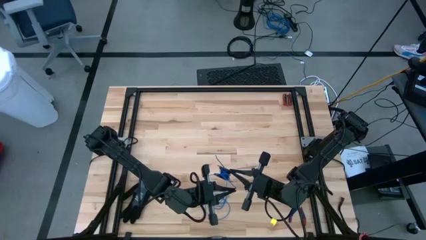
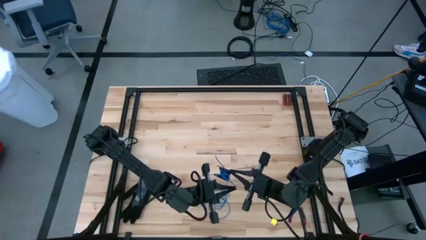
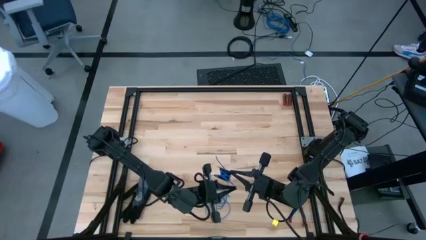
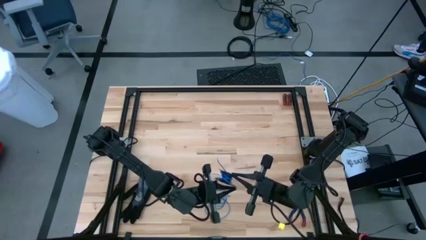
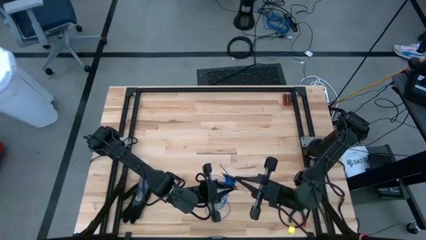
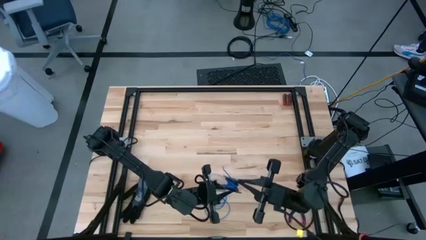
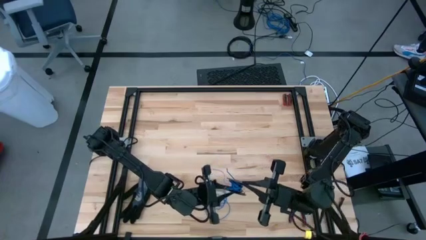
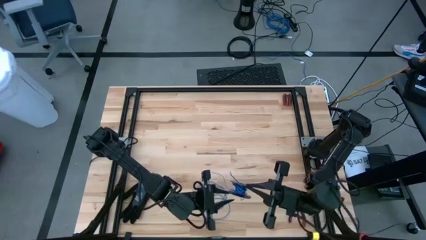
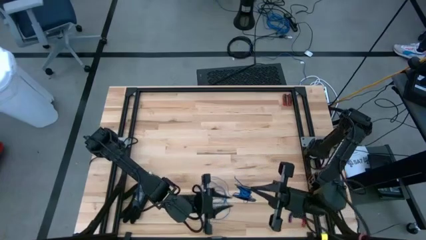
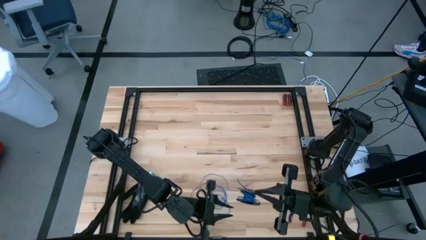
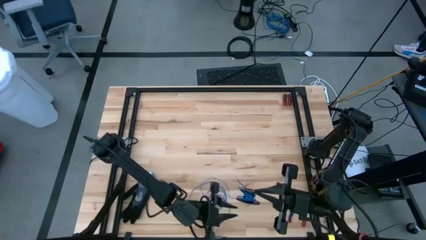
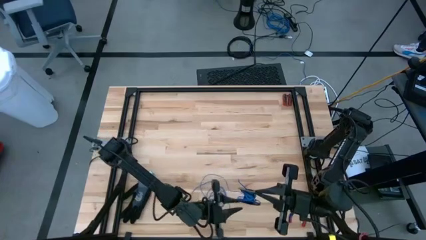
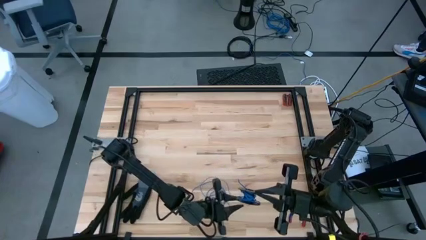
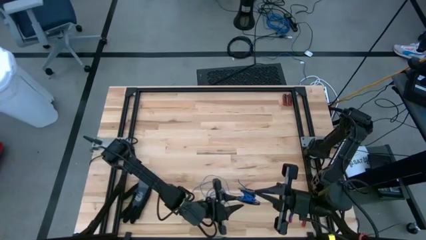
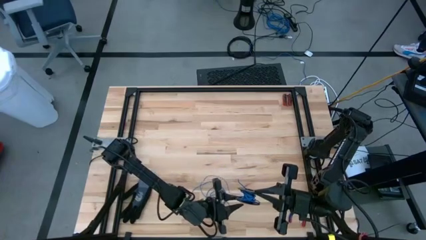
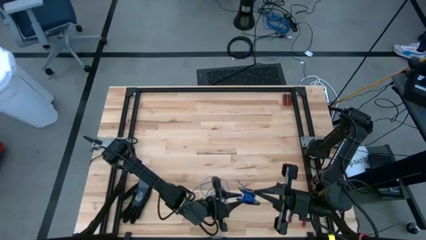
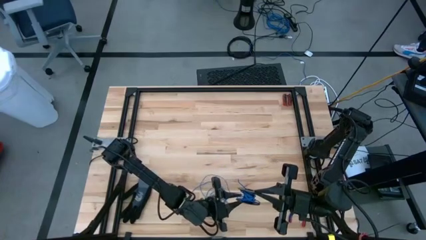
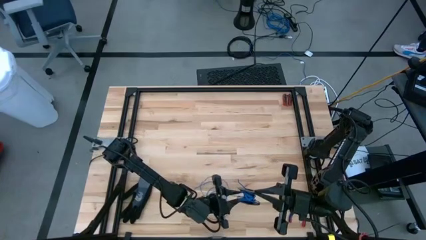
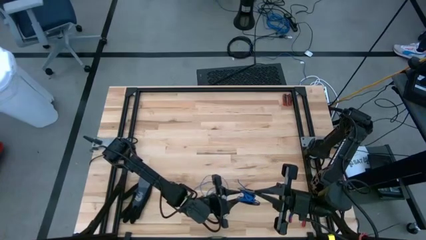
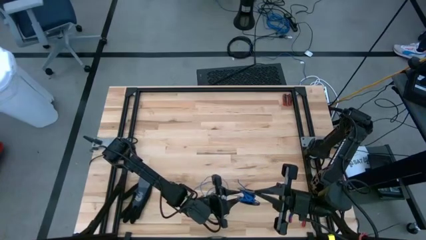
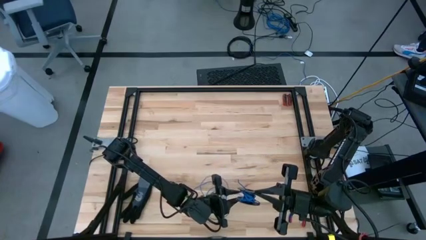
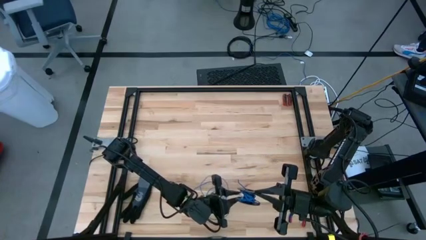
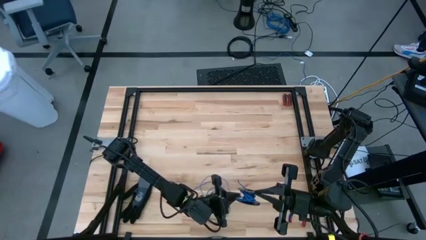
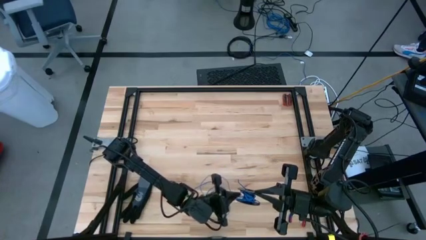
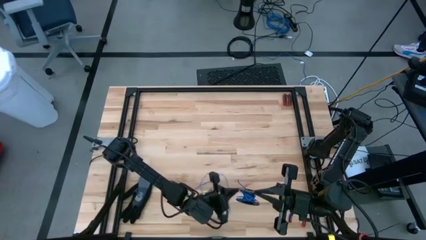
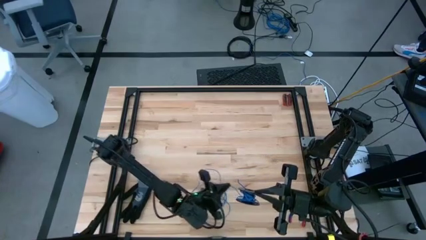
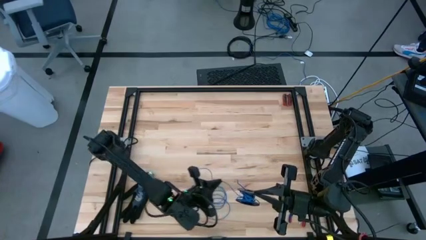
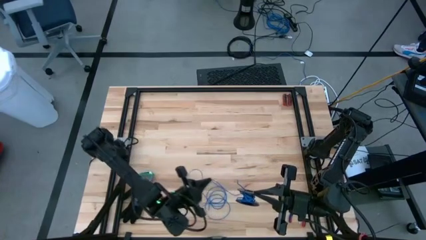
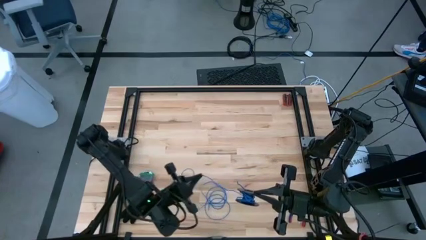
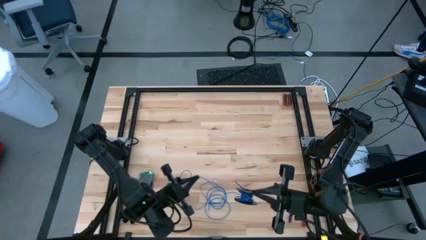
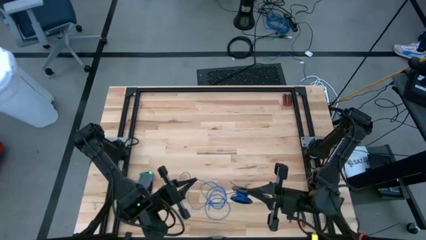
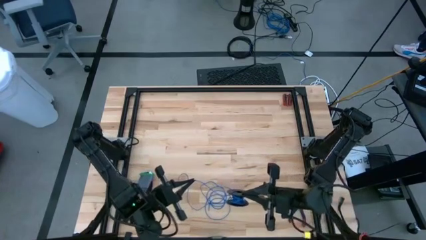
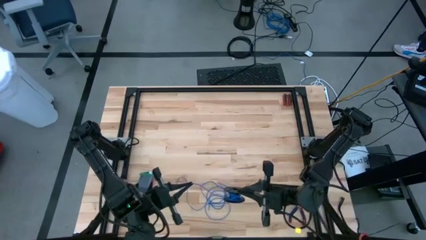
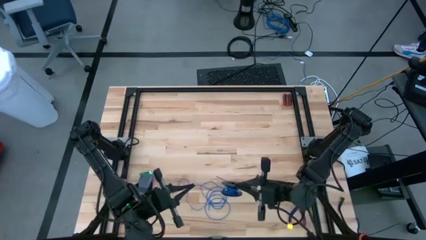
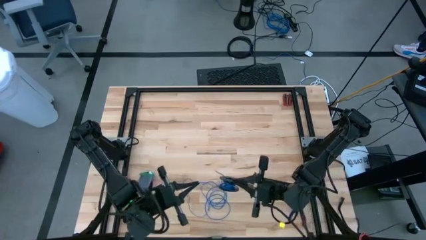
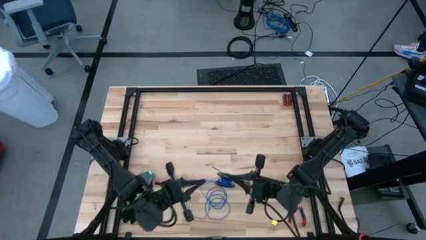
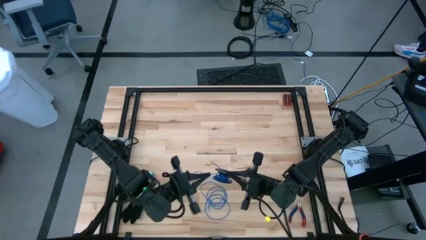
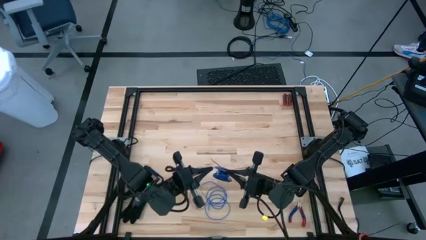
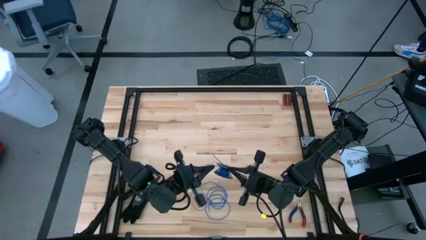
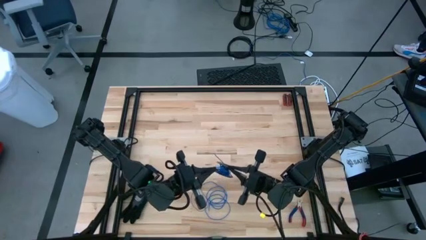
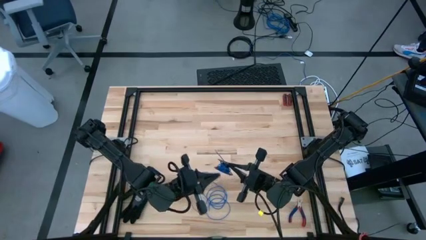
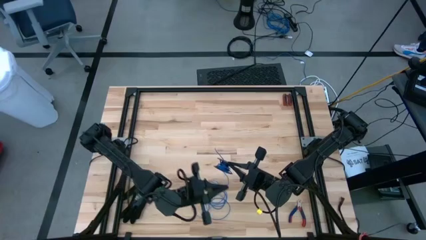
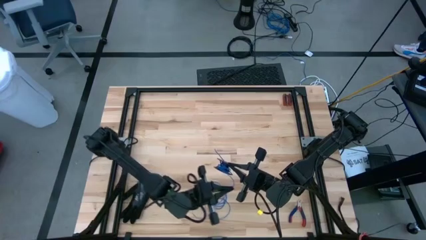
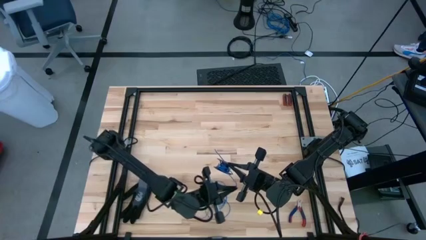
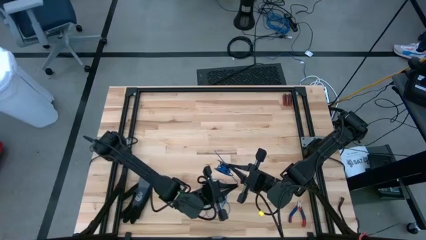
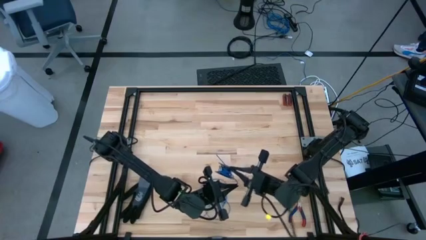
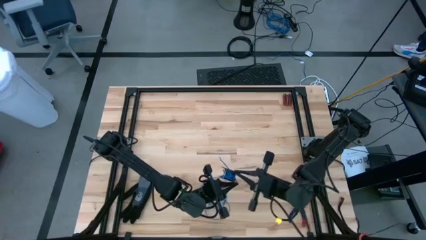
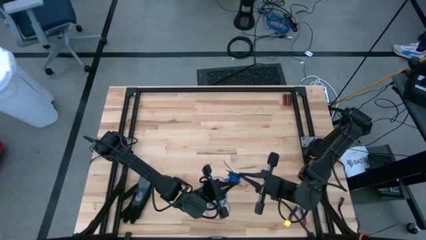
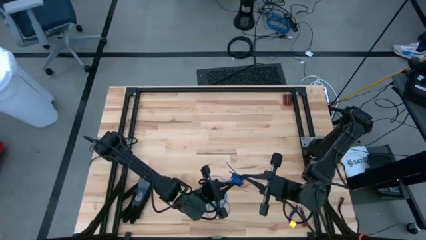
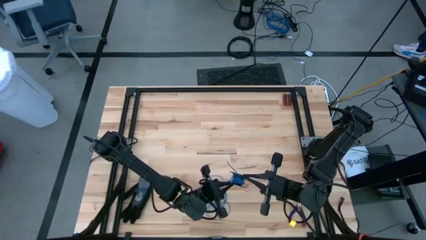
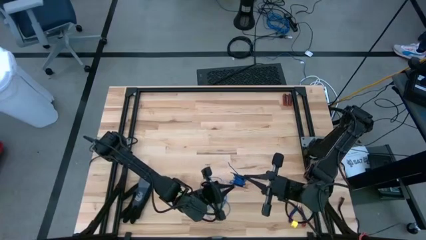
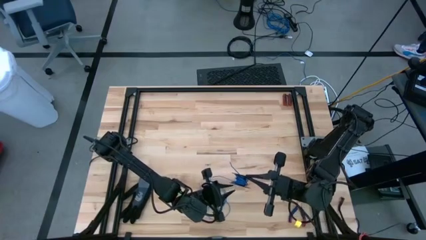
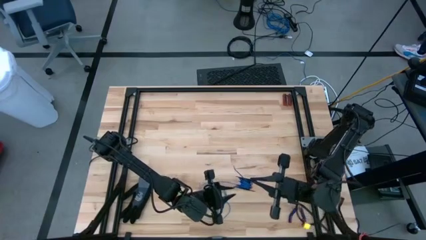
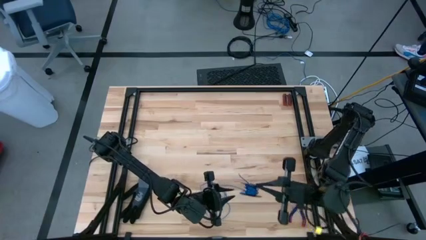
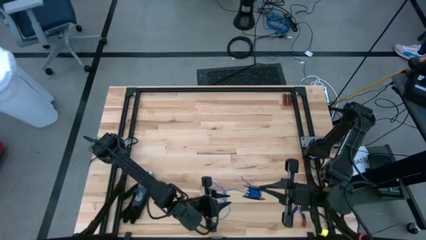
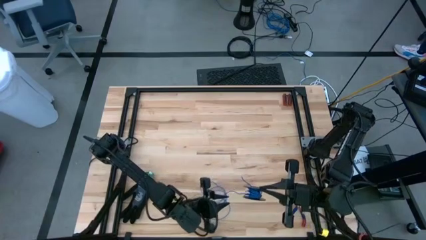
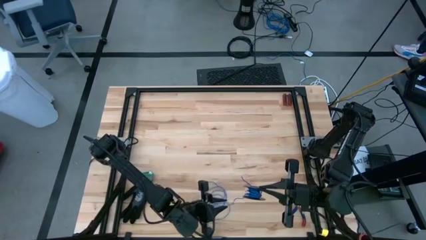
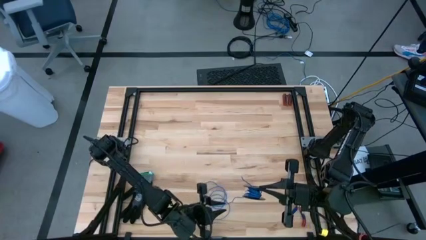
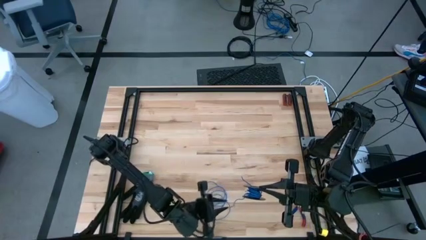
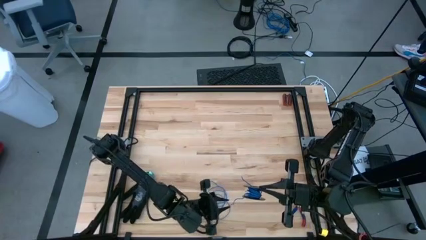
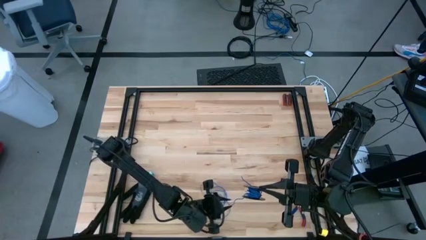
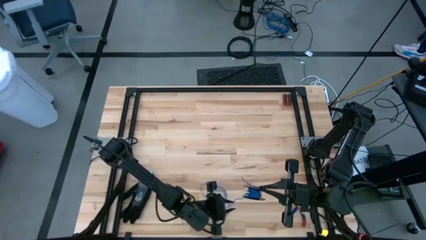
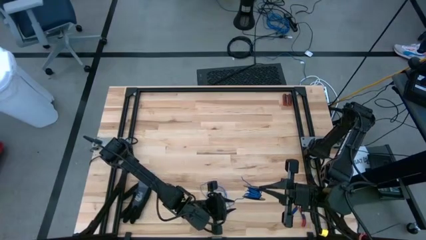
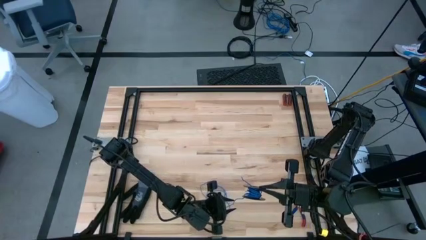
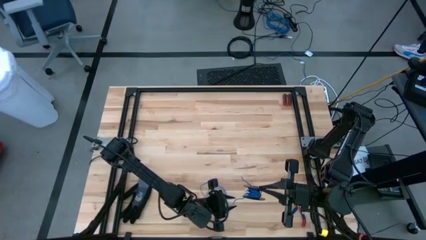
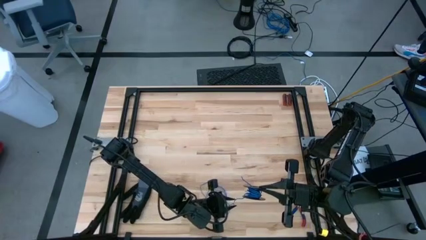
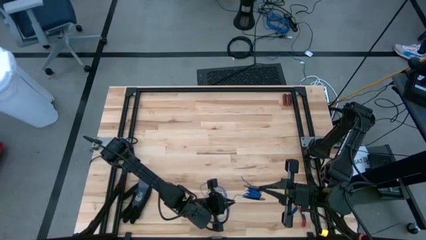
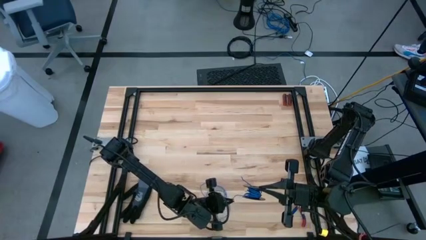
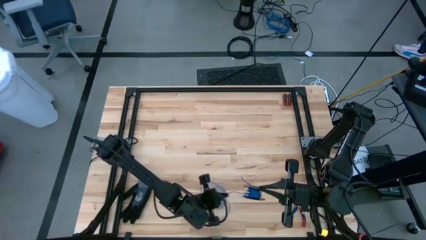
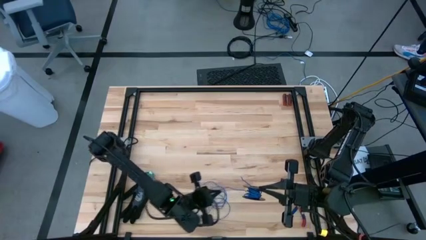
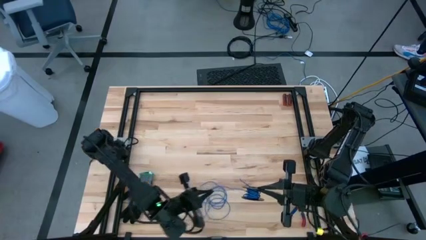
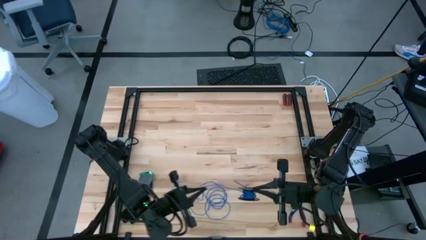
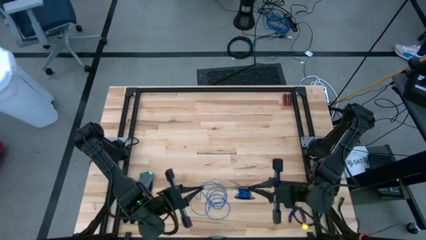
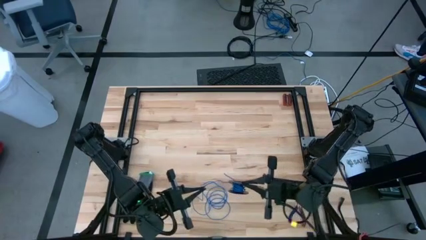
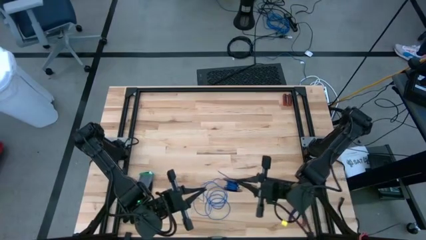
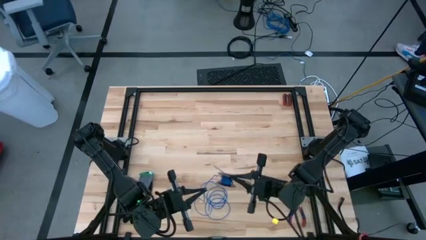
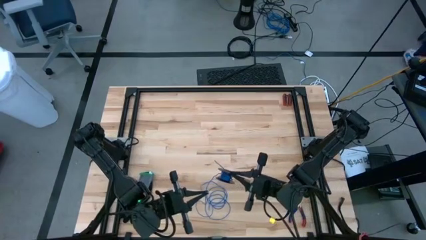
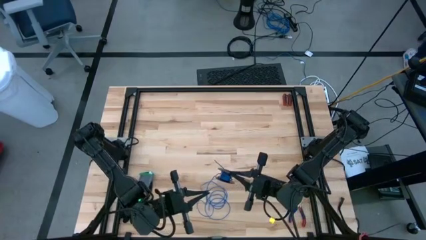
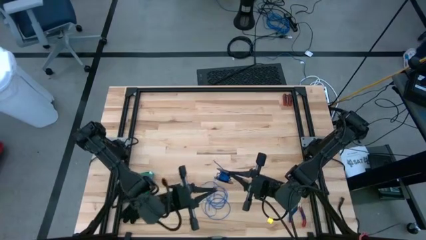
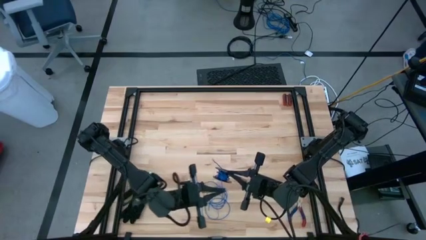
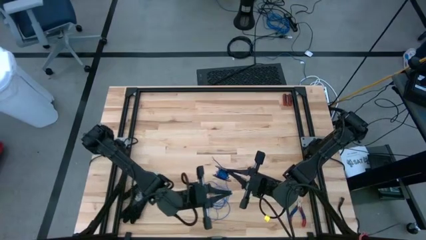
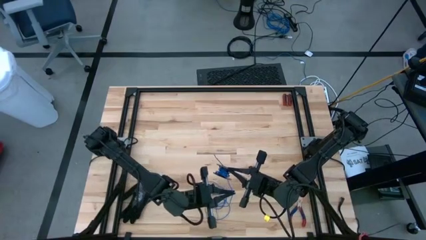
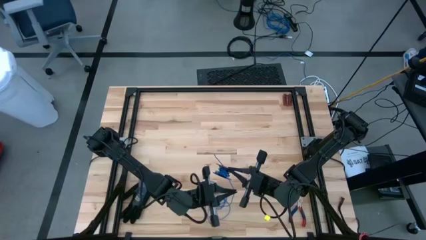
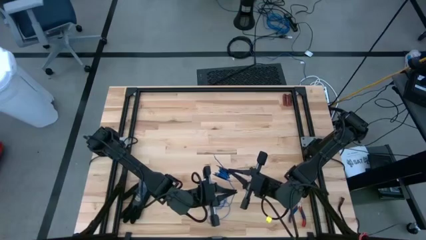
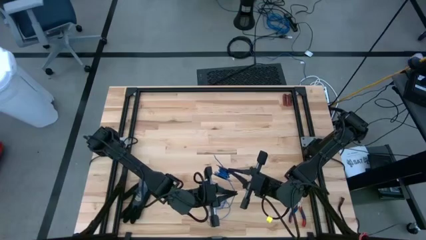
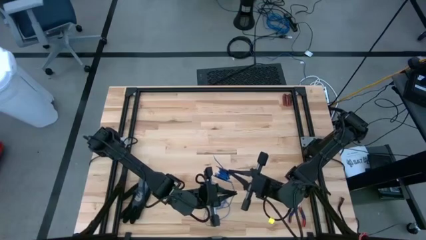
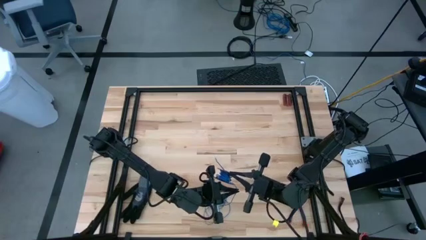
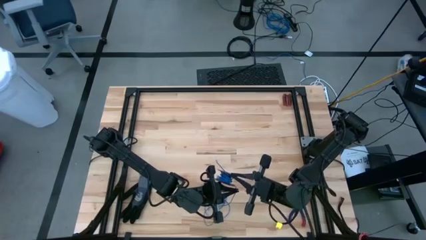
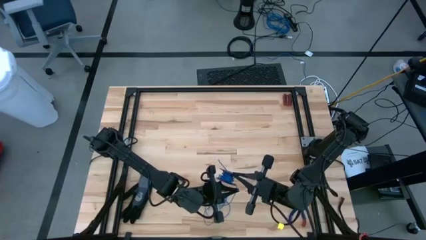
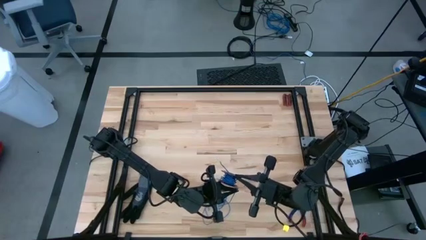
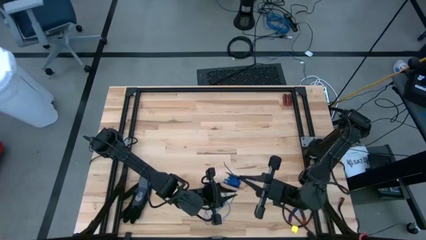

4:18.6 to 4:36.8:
Task: Coil cords
Coil the blue wire onto the spool
